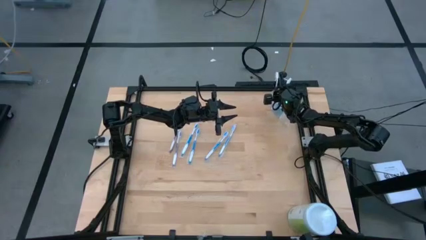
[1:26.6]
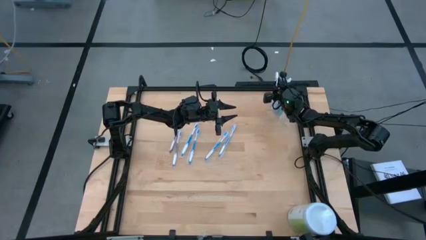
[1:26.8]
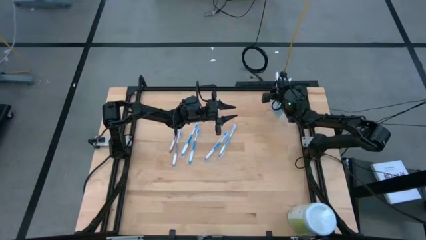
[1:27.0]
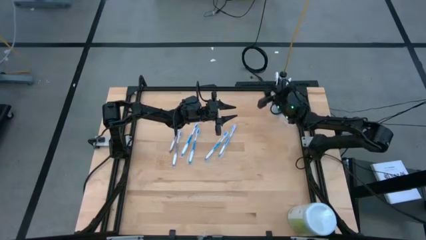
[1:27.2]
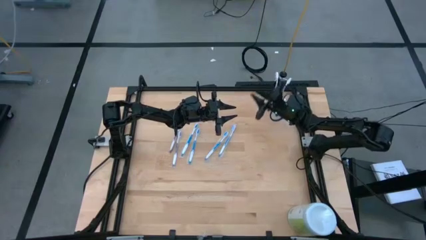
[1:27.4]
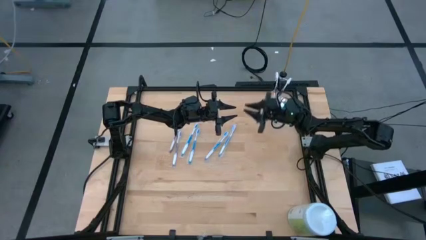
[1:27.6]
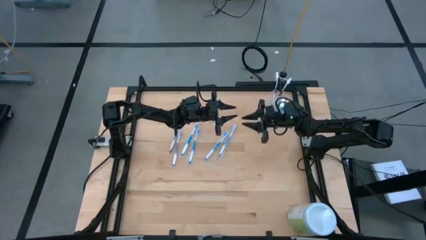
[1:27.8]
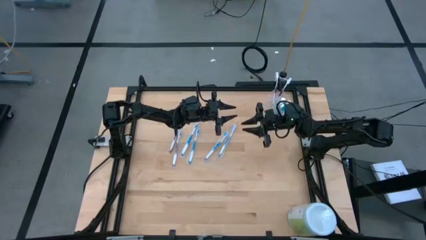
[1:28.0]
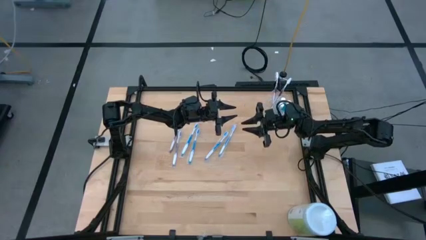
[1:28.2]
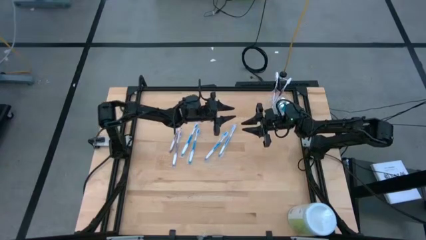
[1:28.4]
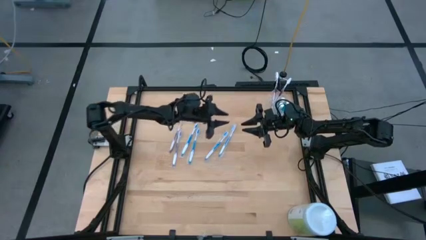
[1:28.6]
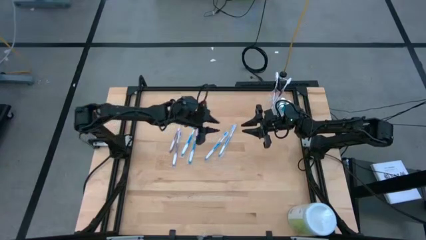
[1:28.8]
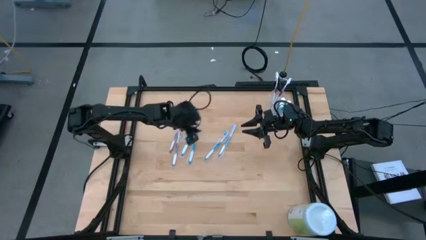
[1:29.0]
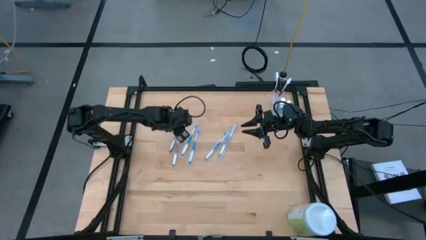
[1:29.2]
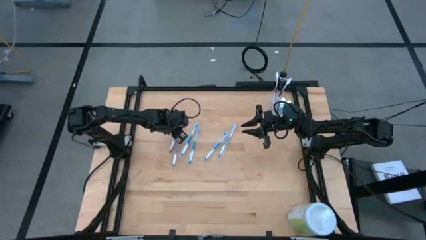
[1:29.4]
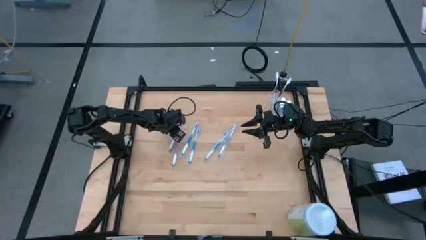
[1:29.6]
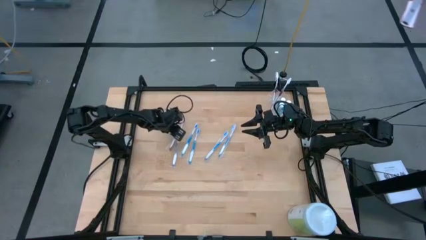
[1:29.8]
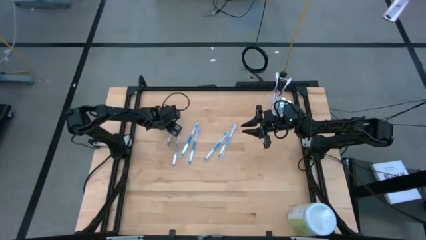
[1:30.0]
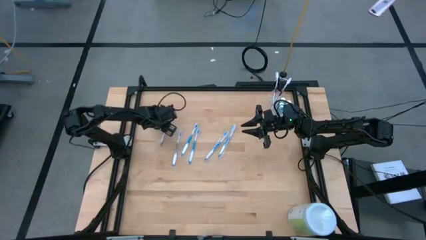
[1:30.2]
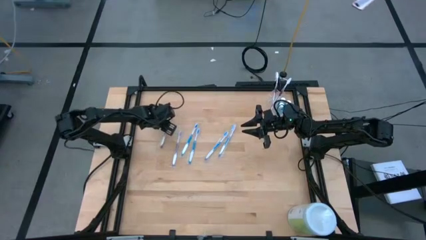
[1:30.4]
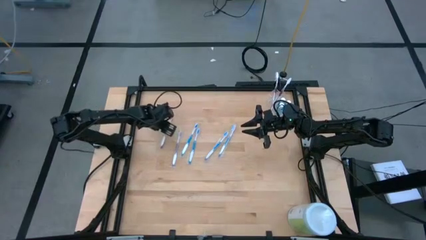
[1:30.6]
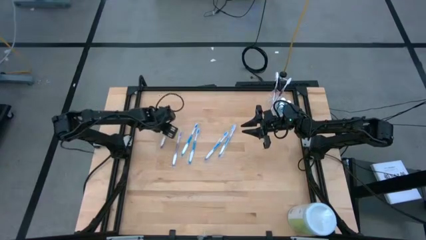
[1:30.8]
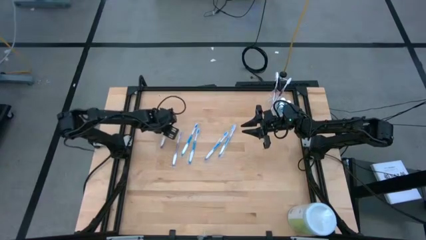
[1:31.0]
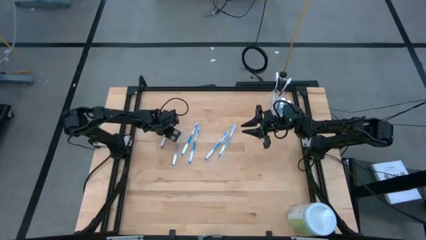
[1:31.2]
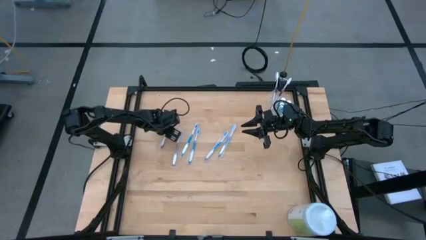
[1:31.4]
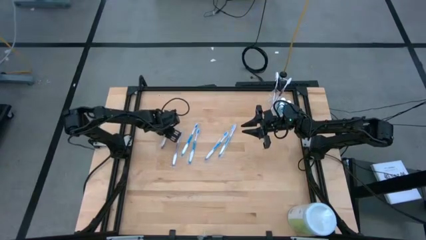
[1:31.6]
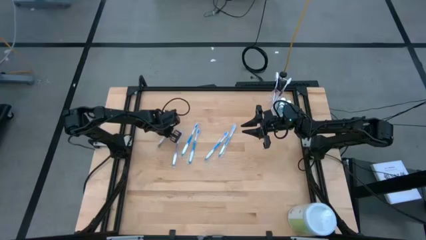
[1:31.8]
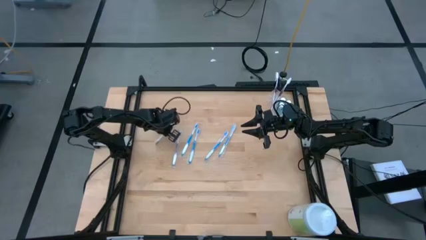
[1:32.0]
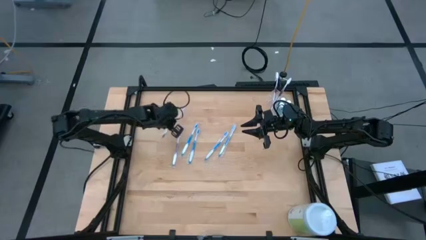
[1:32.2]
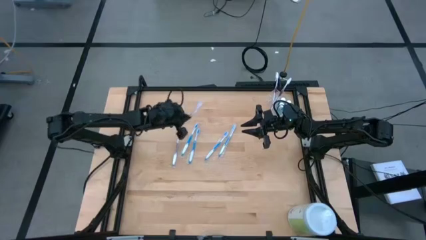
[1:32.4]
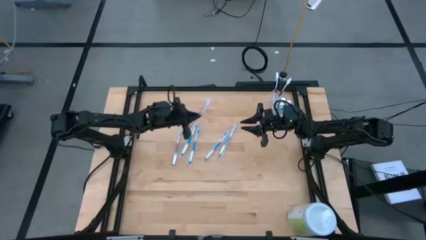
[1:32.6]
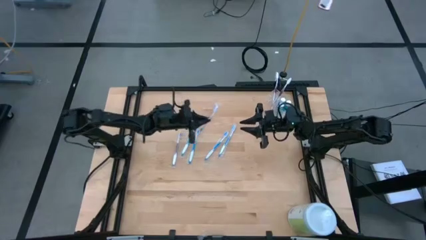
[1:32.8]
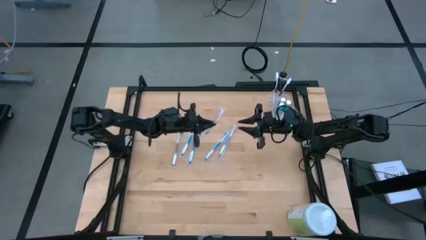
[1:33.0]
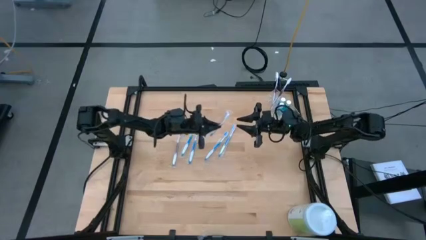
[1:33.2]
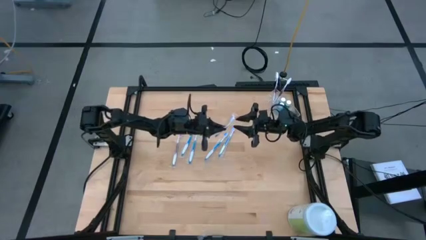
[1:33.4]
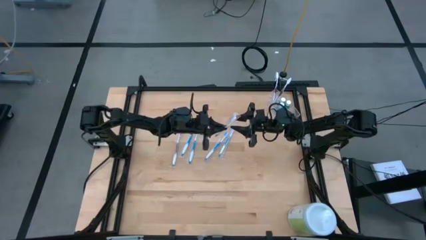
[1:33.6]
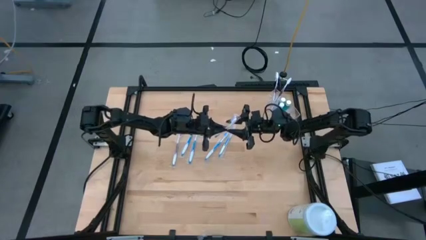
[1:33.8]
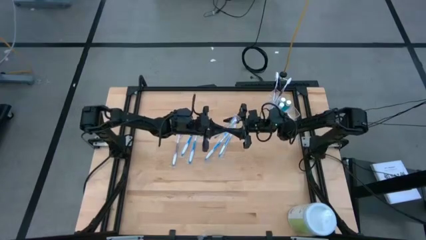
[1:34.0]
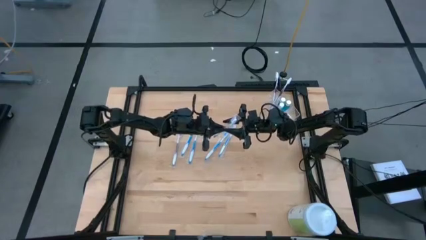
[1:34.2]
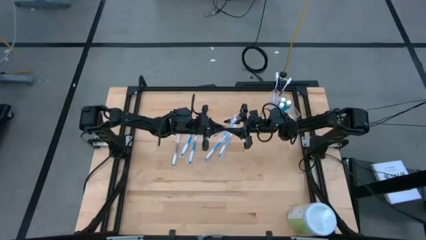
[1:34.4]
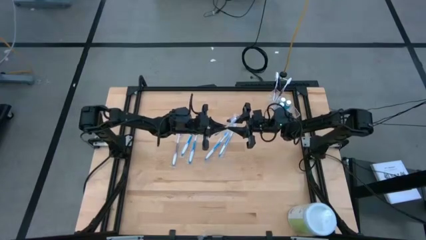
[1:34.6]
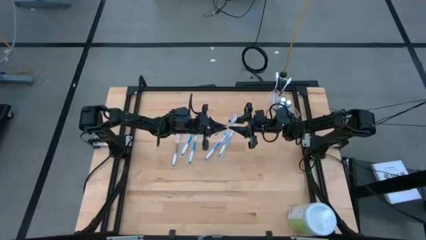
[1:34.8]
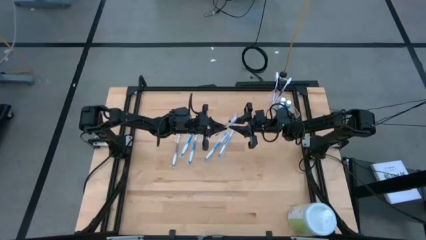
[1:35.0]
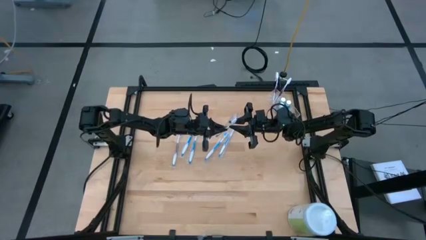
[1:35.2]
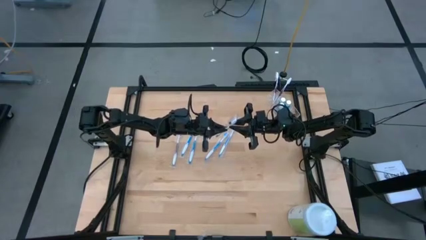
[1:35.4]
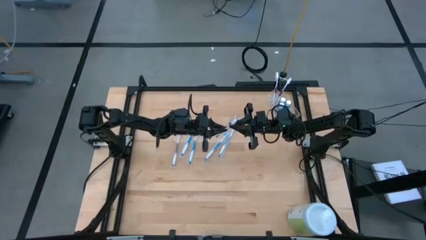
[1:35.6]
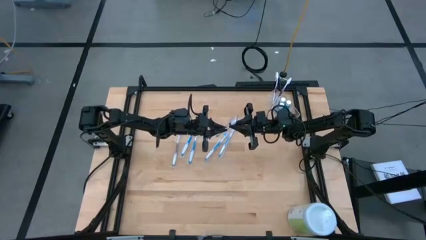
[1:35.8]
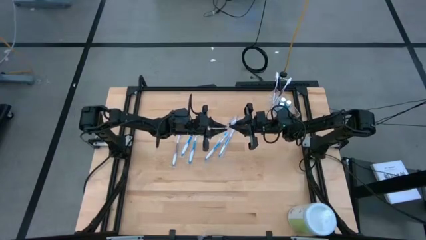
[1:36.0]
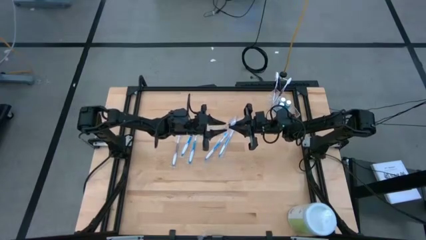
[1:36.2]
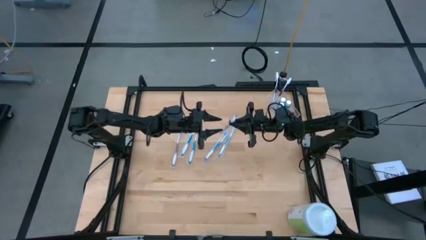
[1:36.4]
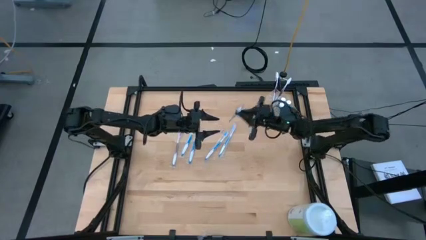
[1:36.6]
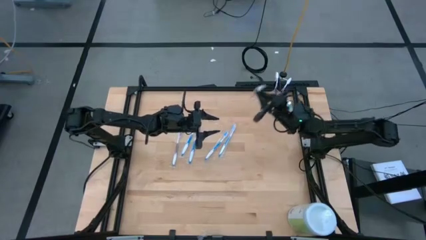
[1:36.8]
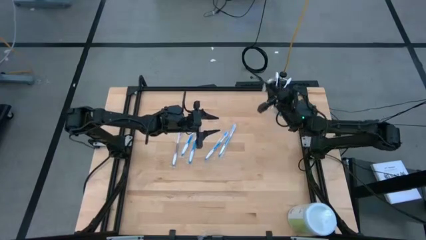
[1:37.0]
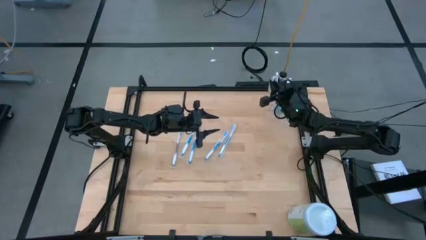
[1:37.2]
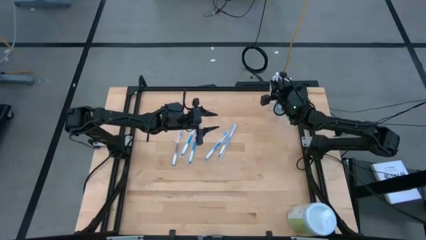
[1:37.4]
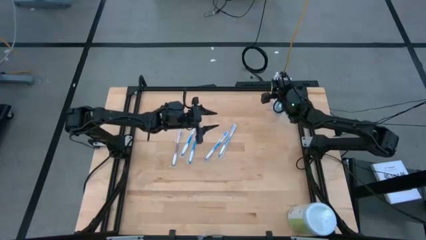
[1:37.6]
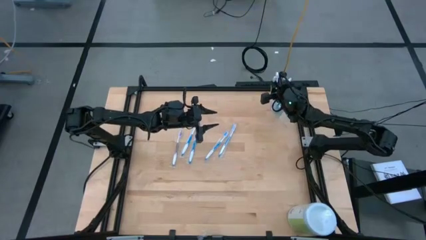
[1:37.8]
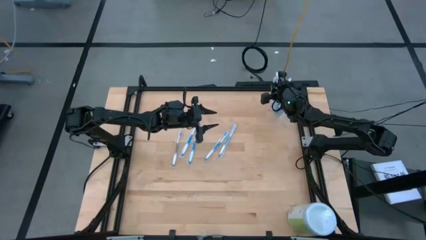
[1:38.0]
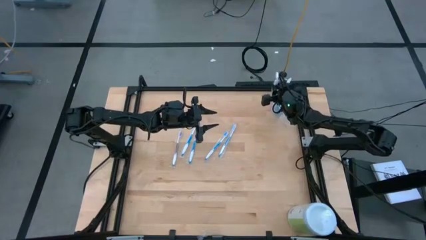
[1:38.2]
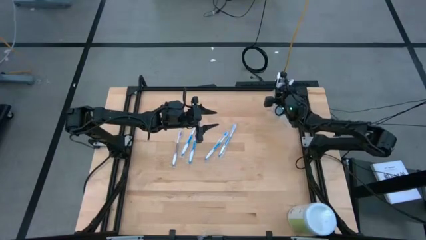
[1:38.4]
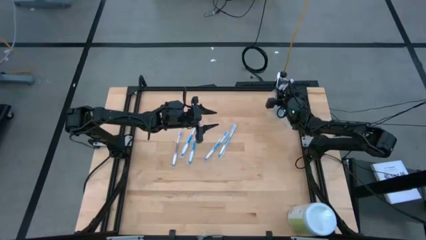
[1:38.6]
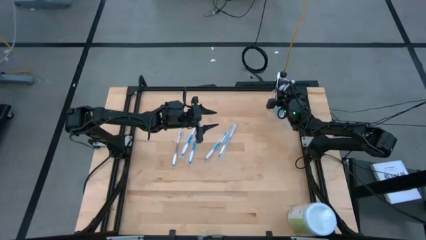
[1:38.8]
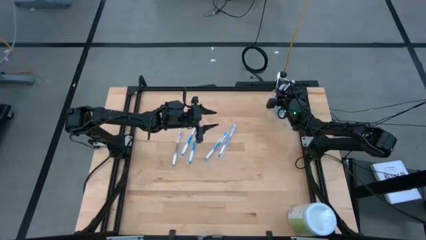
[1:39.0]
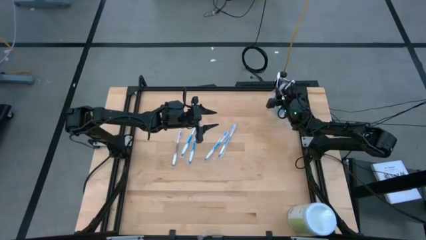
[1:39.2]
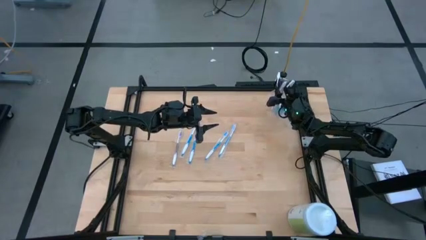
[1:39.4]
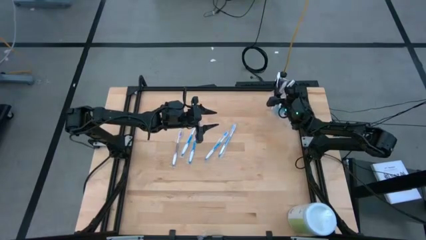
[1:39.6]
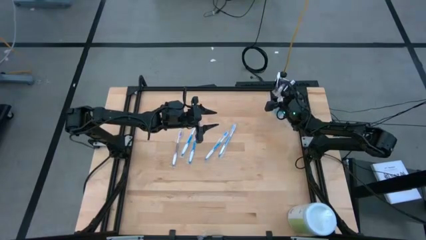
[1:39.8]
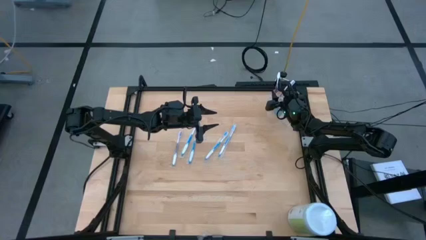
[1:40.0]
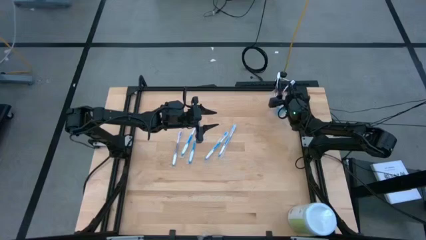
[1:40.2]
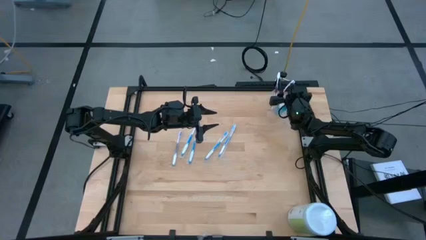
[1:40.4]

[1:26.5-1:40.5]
Task: Pick & Place toothbrushing station
Put the violet toothbrush into the left of the transparent organizer
